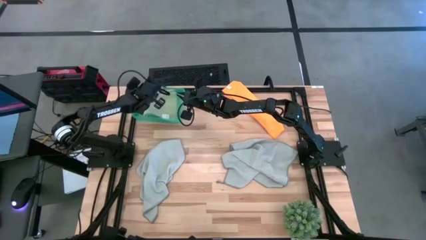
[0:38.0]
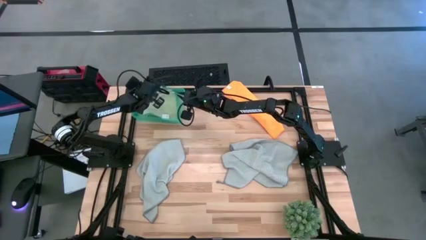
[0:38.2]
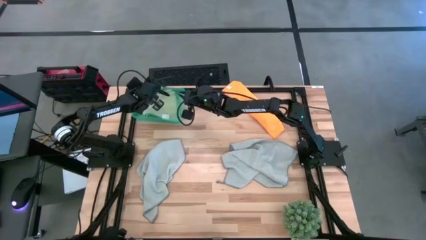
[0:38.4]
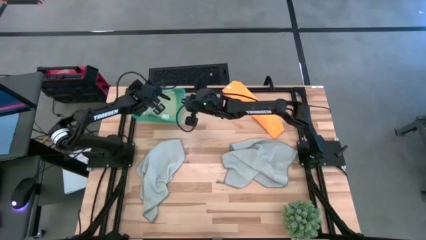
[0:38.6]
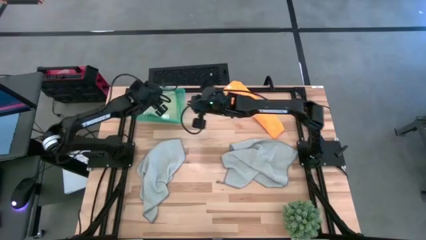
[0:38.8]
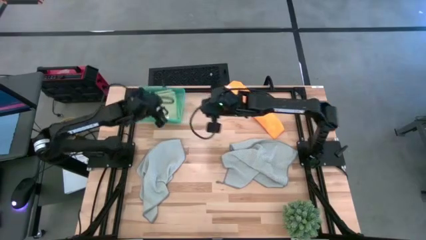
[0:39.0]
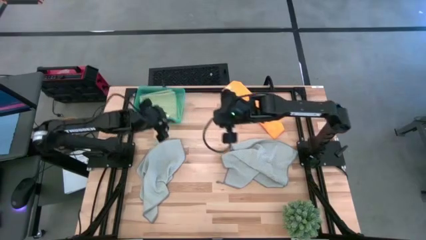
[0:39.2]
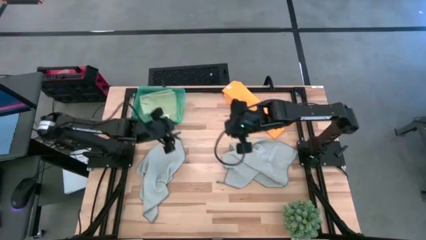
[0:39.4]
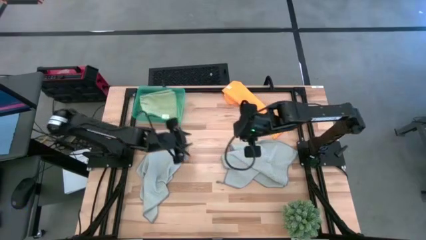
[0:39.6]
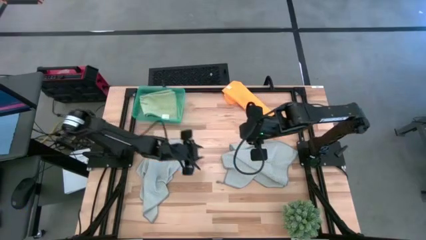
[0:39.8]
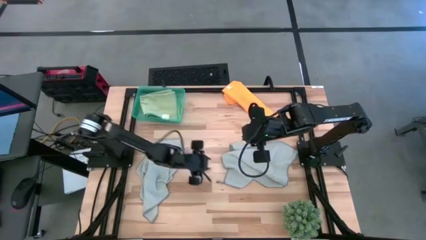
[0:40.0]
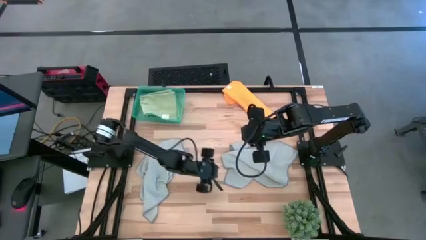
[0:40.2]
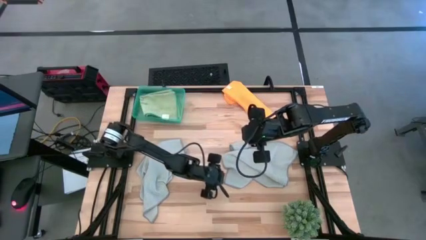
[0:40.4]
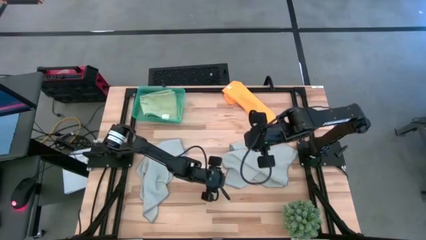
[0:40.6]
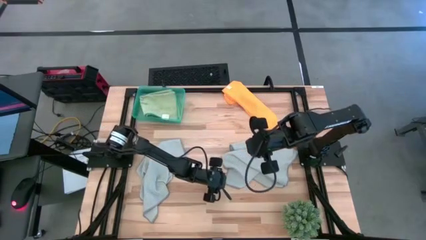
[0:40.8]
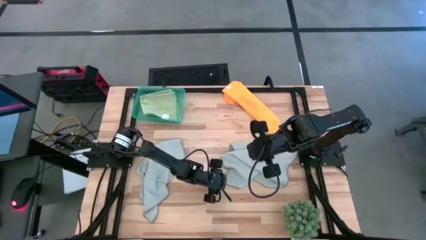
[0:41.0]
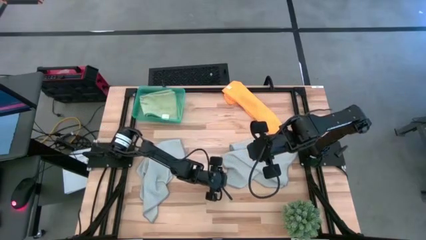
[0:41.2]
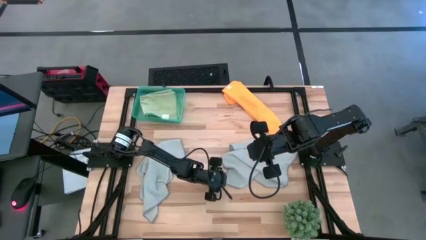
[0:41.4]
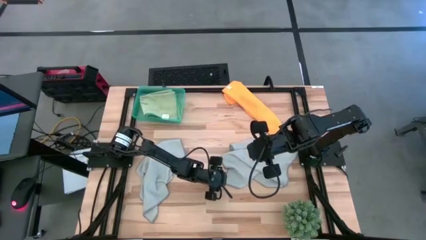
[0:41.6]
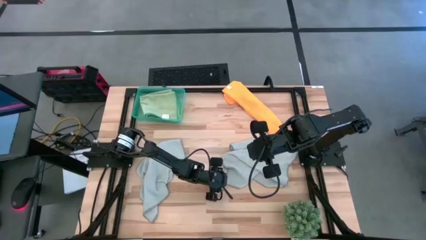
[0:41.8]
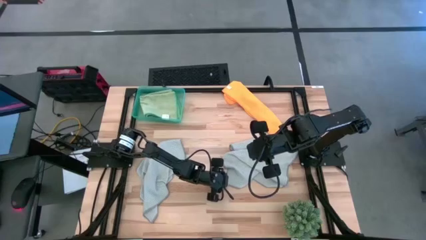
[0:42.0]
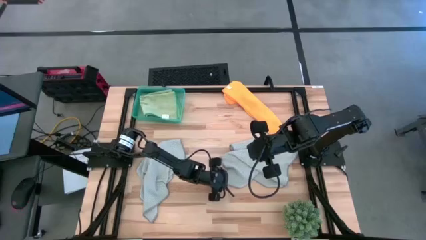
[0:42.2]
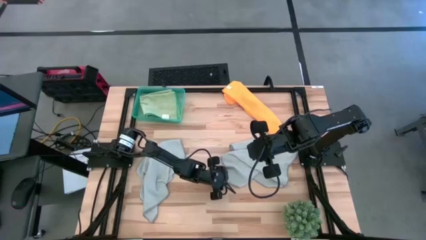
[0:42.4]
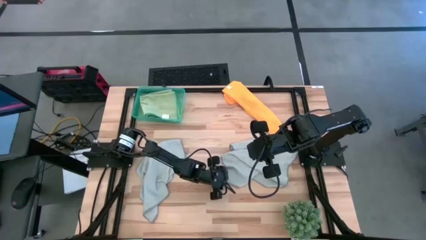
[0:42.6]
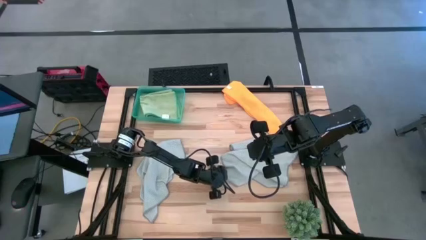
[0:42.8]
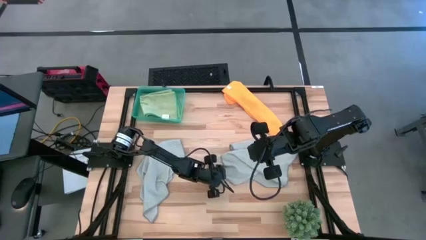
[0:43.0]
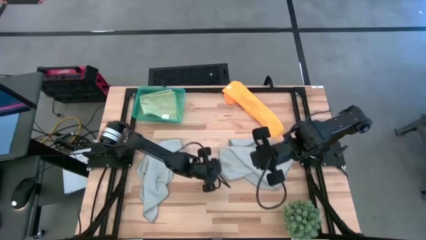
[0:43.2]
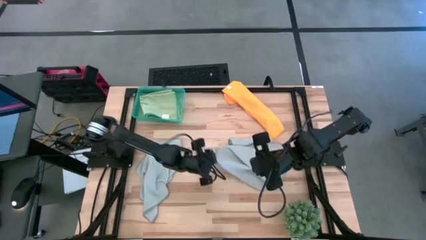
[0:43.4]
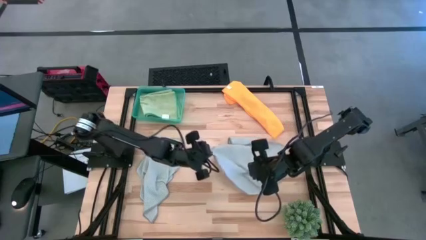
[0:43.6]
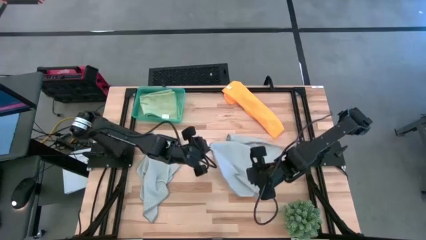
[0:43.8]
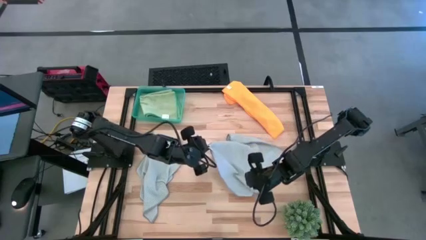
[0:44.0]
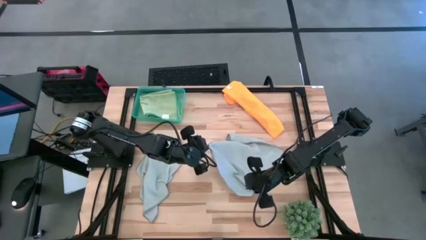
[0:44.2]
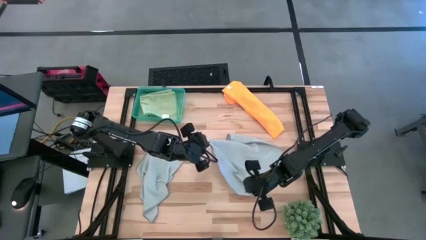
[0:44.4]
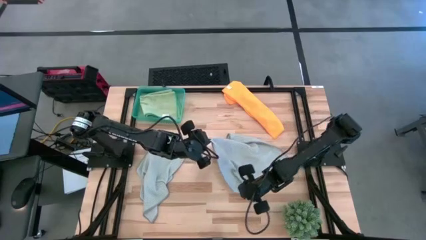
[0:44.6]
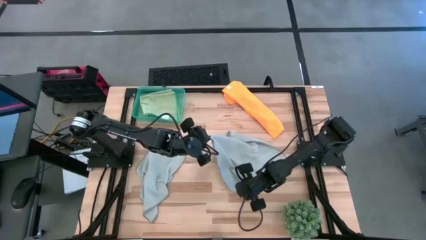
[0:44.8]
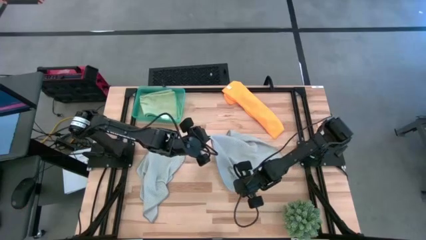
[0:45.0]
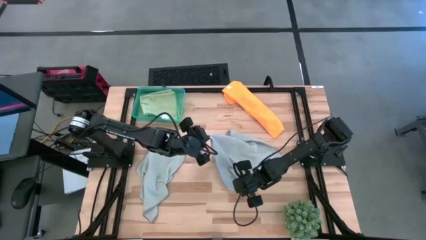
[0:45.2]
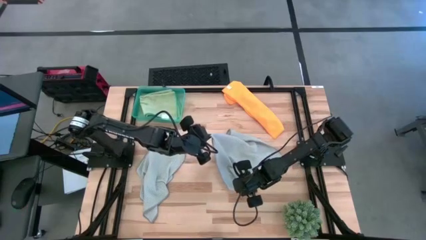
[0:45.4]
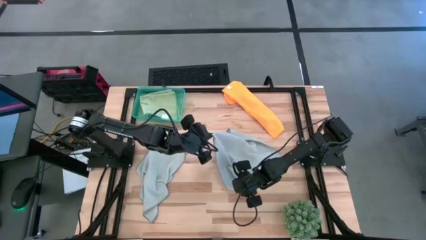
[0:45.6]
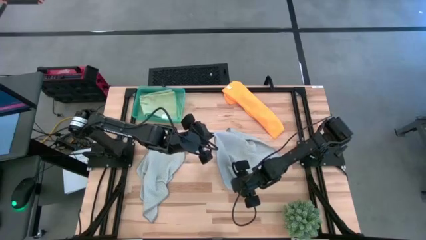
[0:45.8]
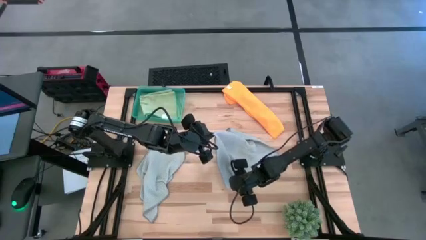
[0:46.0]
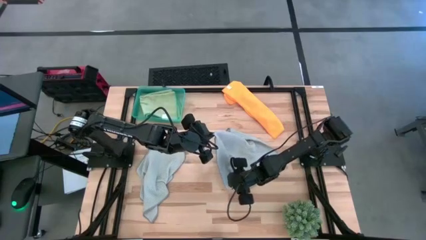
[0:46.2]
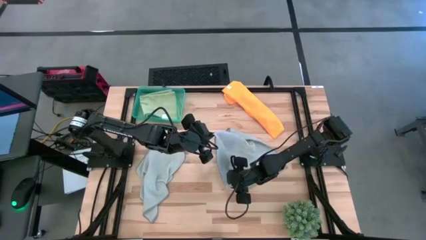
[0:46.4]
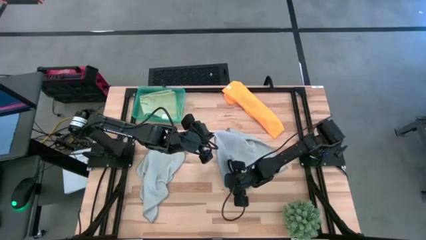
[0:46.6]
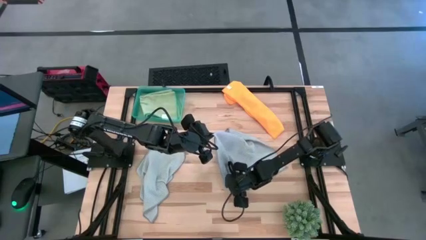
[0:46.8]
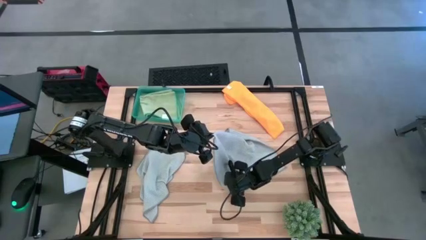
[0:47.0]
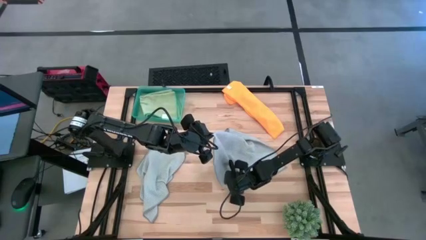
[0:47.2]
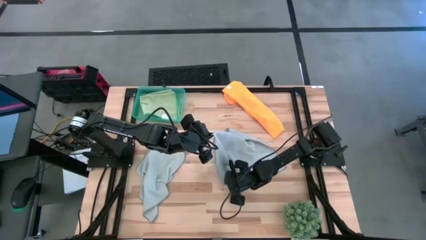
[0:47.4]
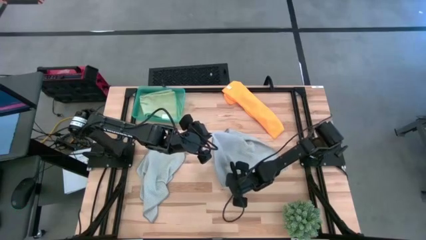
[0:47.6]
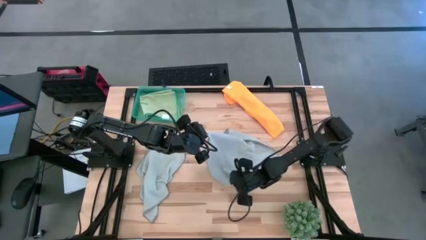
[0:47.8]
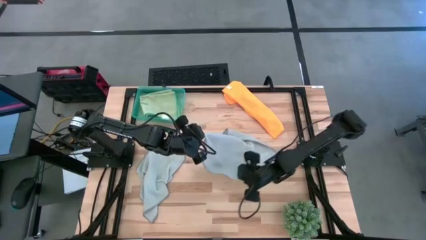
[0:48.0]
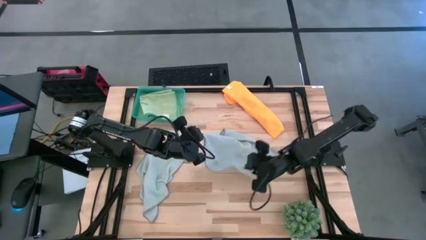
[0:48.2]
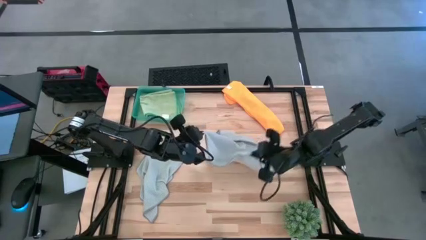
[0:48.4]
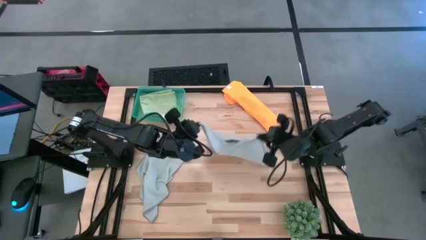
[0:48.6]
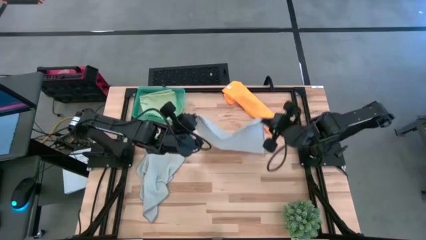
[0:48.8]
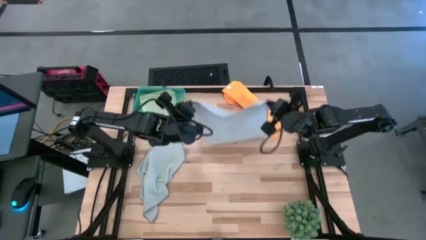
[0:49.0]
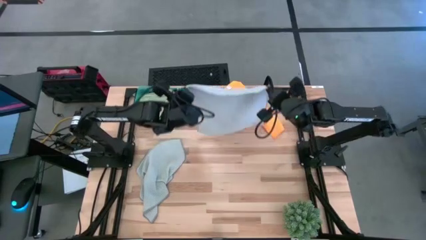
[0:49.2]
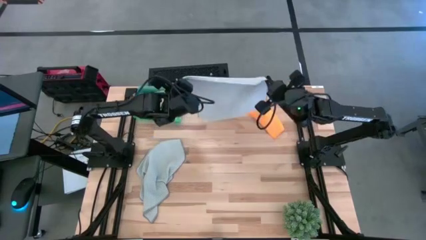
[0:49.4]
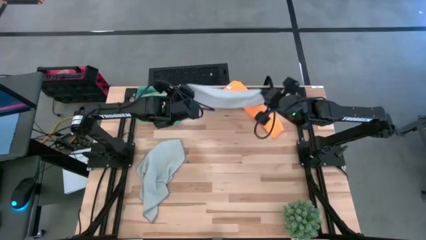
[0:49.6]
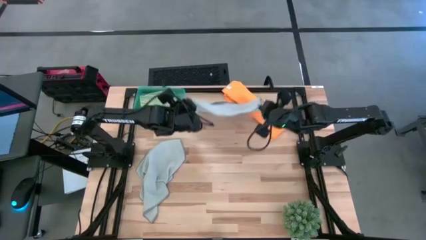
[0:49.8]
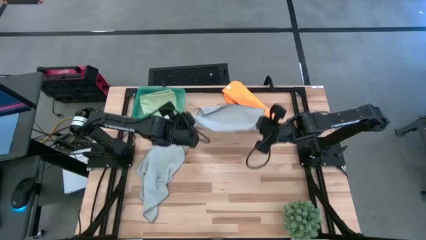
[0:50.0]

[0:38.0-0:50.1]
Task: Fold microfiber towels
Fold the right gray towel

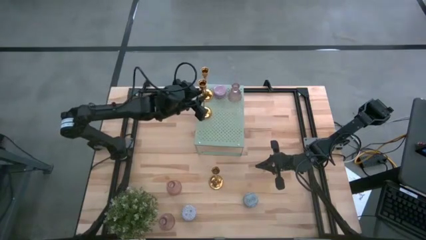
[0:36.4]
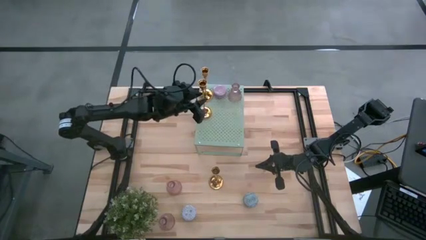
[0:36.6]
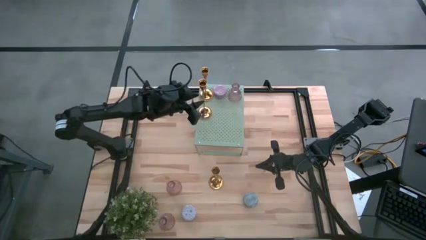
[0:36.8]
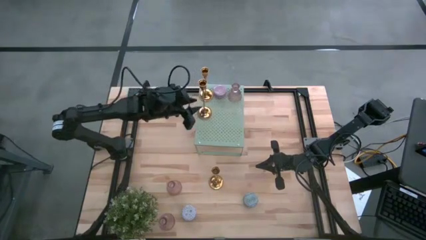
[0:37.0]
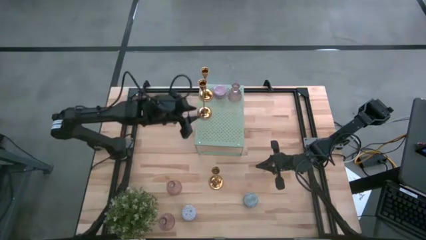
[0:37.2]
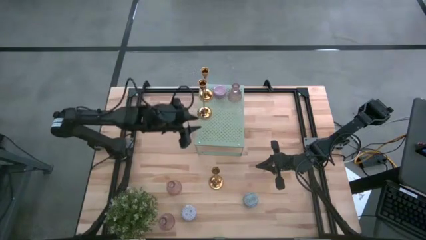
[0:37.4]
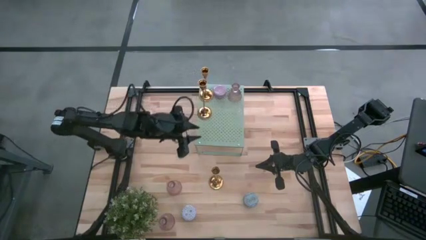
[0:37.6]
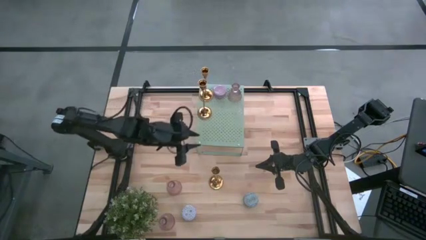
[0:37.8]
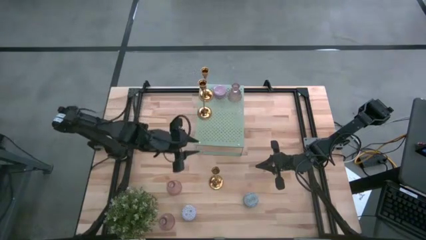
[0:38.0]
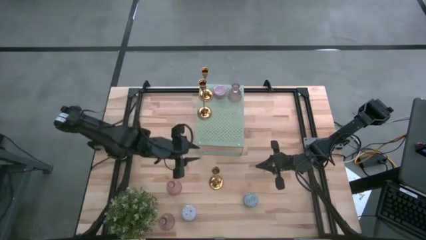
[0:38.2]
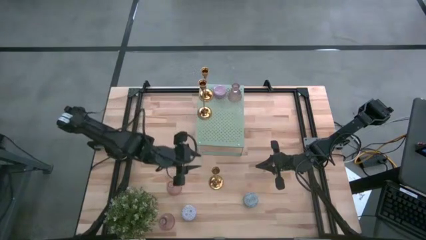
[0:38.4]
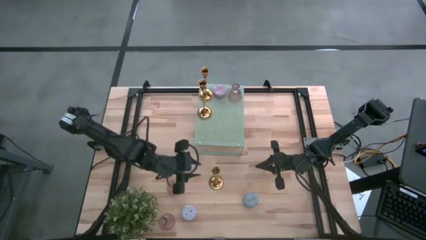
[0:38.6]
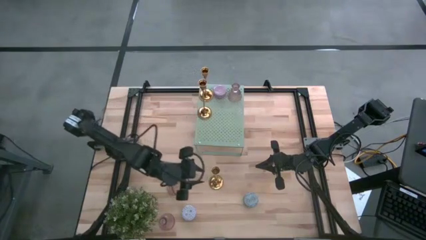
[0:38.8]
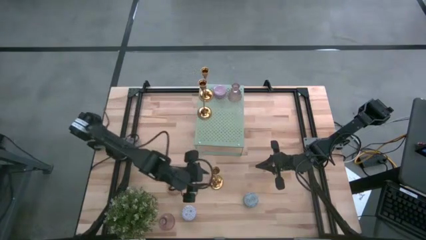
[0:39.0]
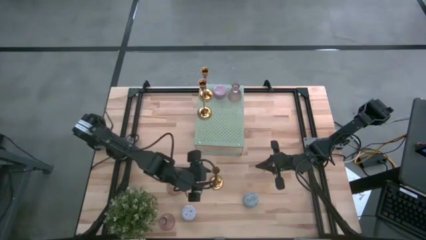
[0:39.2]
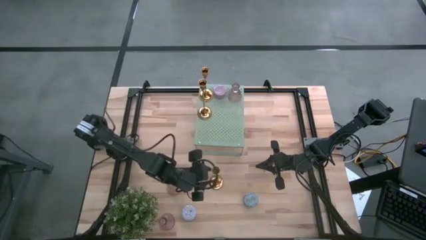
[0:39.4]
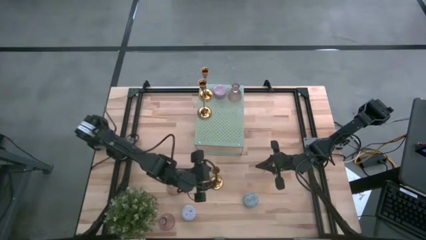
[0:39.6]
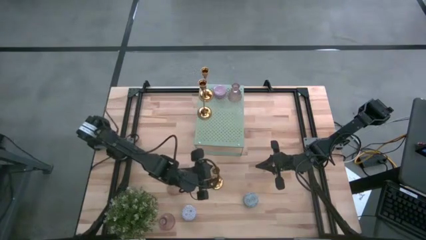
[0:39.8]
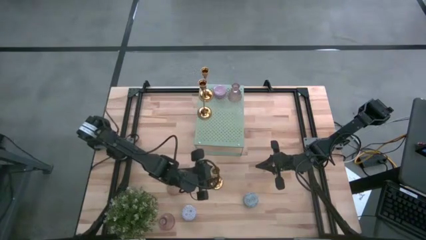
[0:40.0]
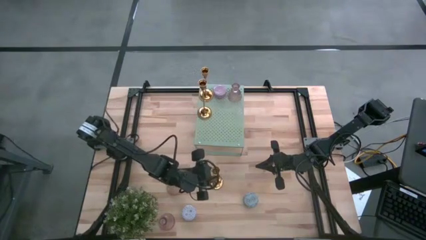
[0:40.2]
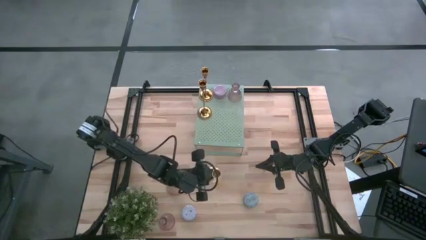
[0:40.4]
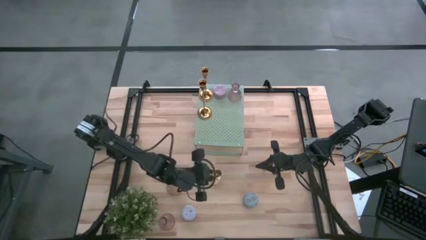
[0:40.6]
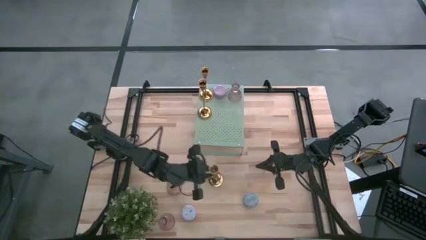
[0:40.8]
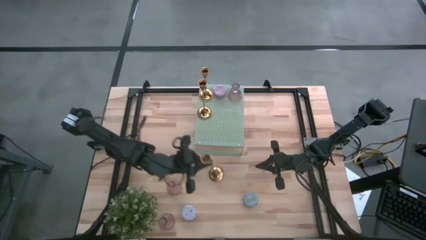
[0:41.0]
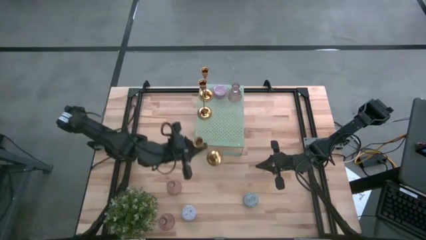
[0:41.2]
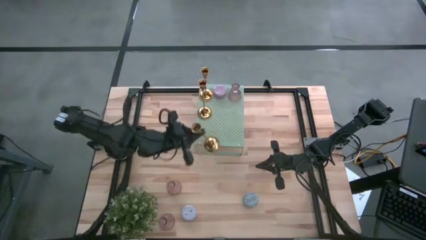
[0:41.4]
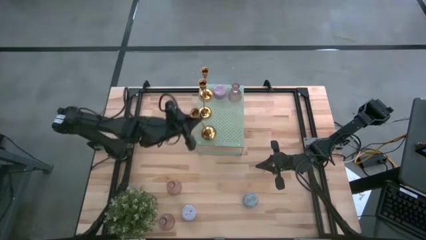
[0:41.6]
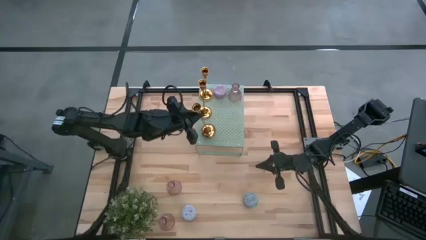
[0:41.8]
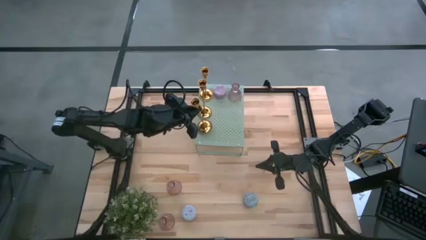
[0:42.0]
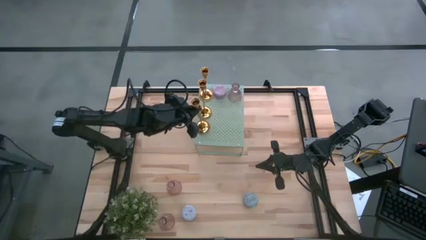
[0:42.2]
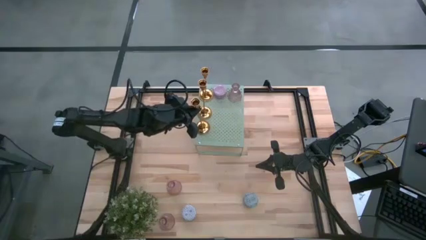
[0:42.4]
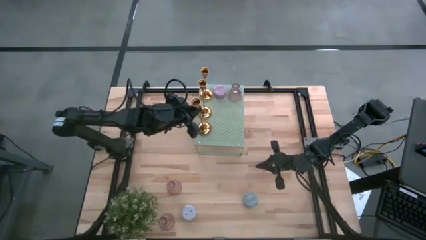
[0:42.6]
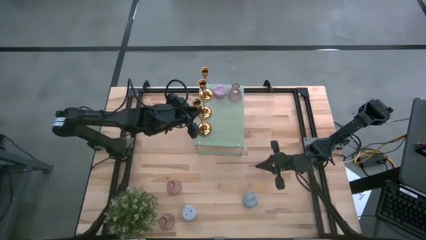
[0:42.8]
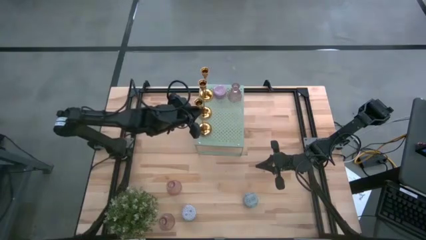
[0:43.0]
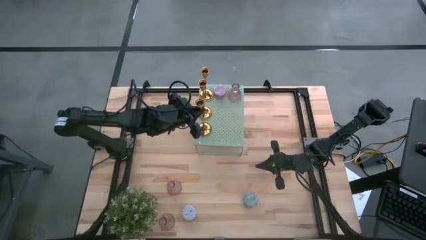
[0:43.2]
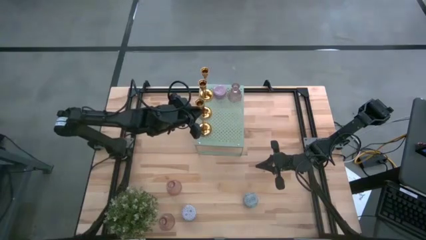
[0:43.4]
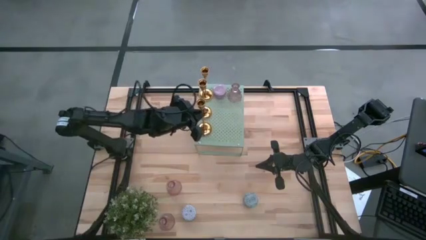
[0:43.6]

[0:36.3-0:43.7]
Task: Pick & Place candle stick holders
Put the metal gold candle holder on the shelf
